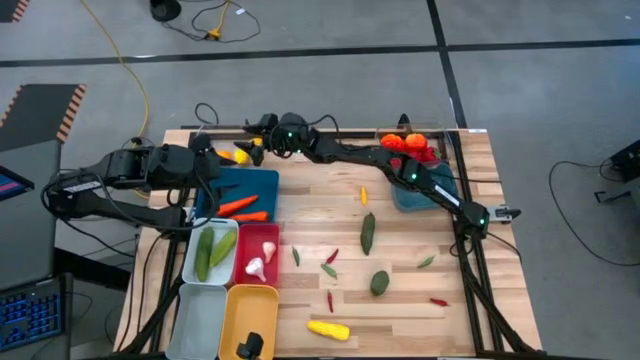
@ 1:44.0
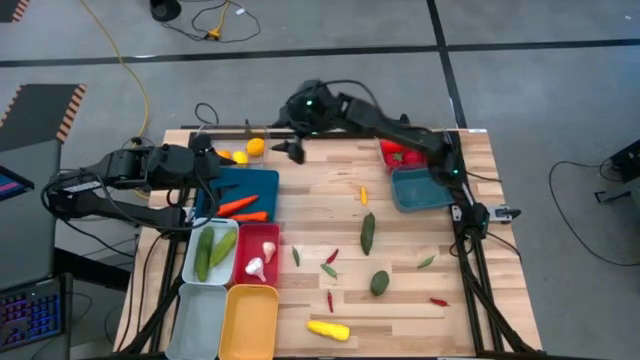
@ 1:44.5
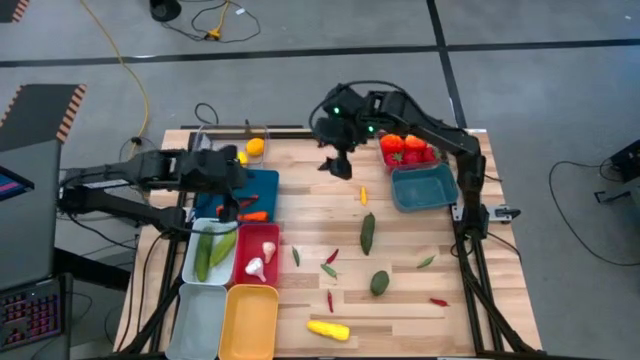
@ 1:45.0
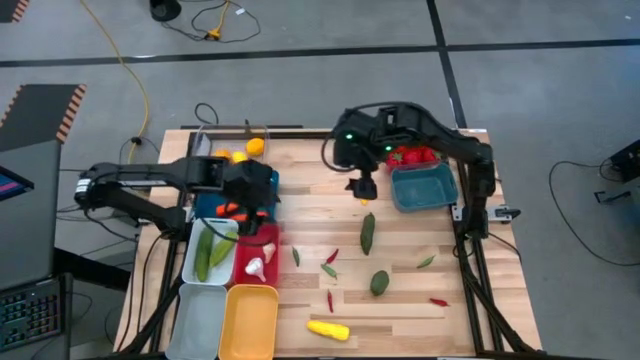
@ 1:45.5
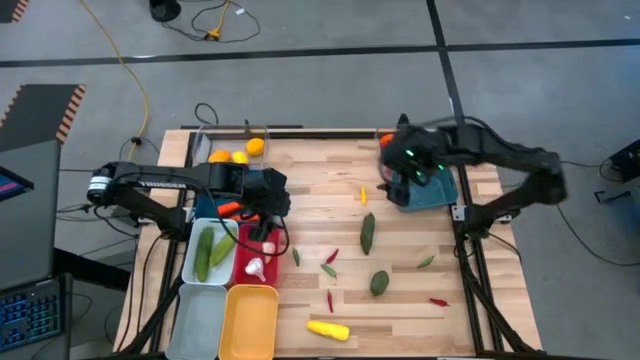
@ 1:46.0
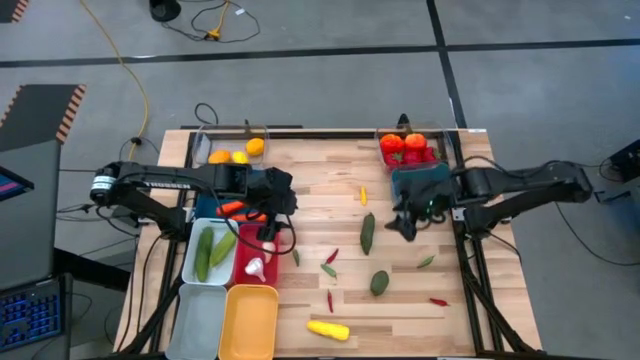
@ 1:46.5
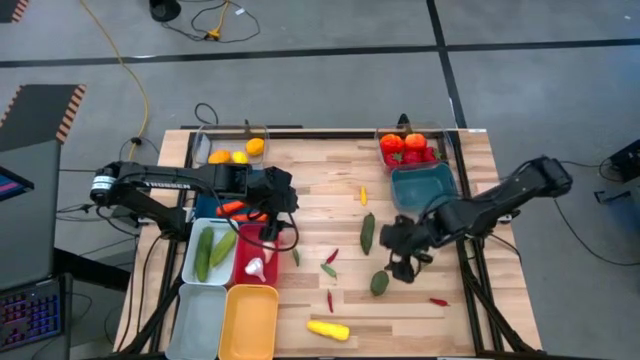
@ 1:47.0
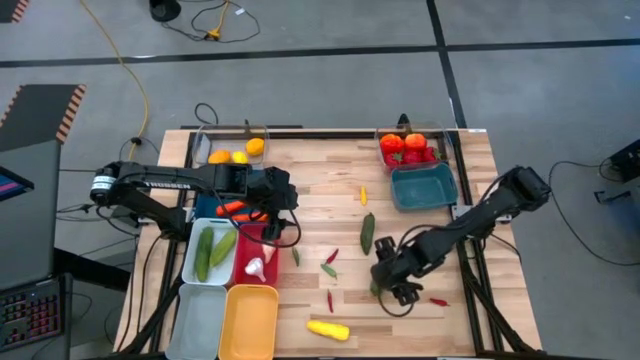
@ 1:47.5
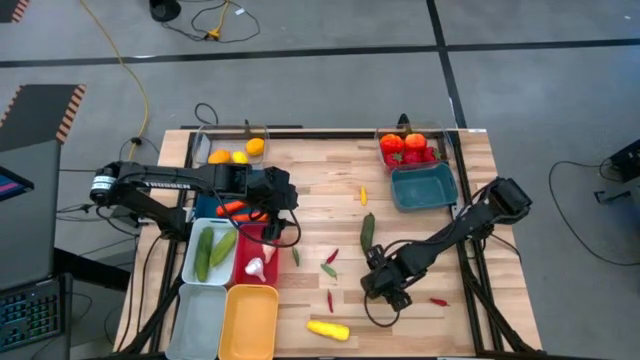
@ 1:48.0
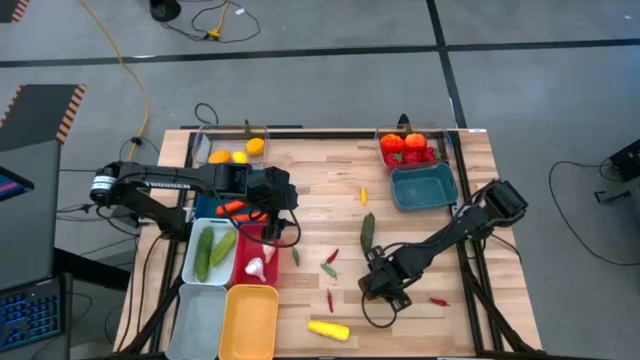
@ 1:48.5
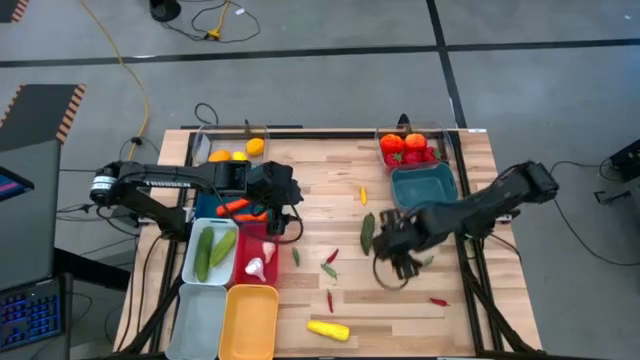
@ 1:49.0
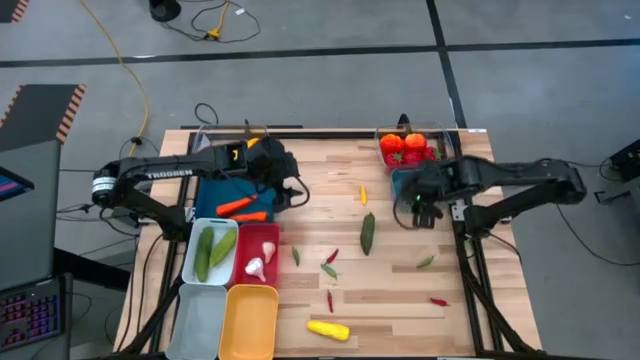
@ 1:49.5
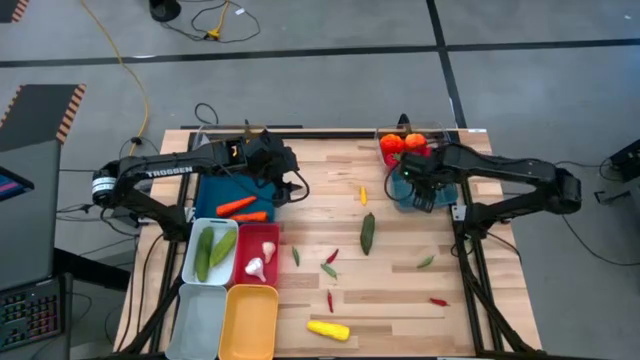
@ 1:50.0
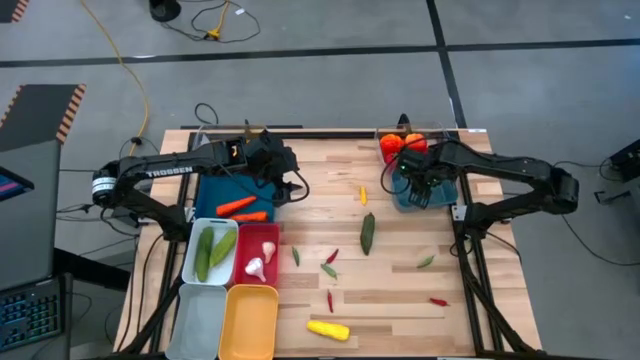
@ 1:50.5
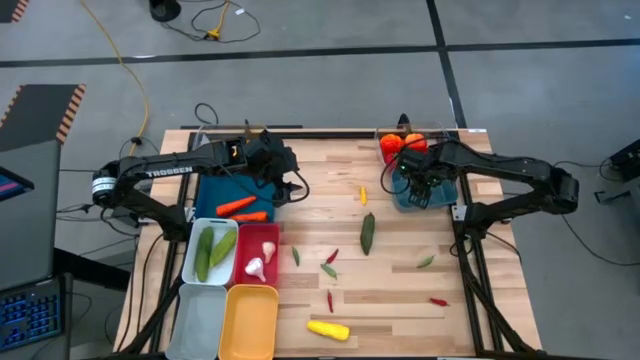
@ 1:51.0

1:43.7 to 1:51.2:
Task: Sort produce into baskets
Put the green lime into the green bin

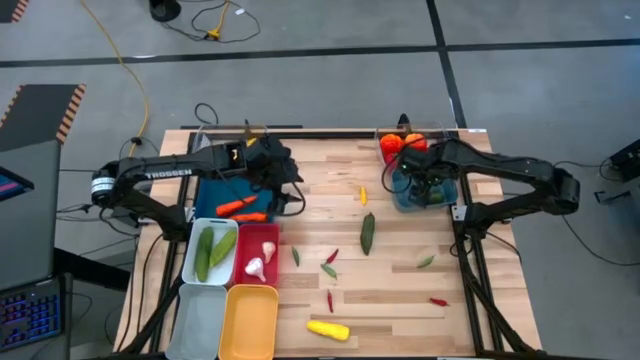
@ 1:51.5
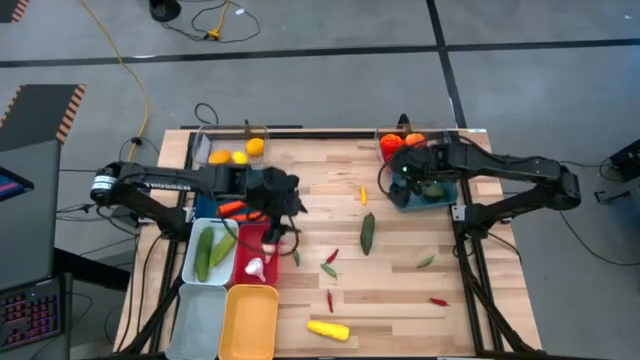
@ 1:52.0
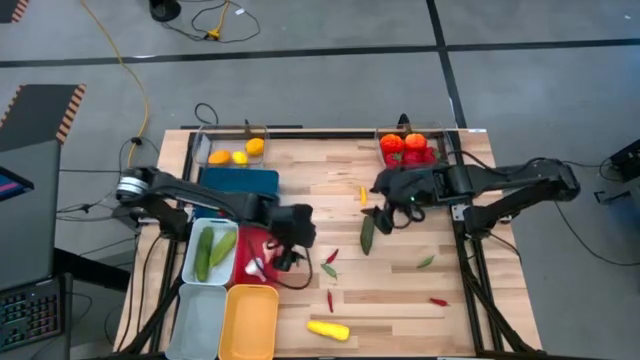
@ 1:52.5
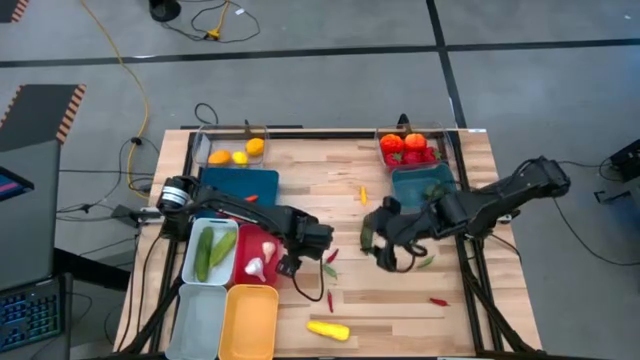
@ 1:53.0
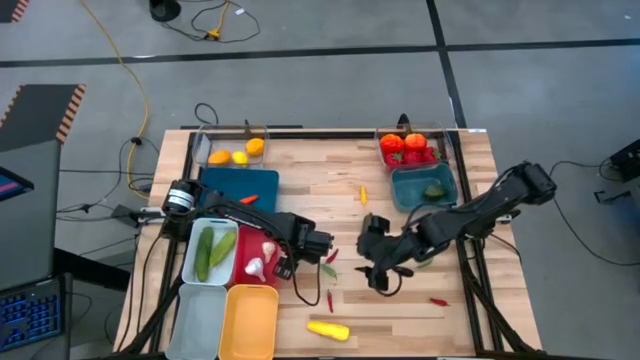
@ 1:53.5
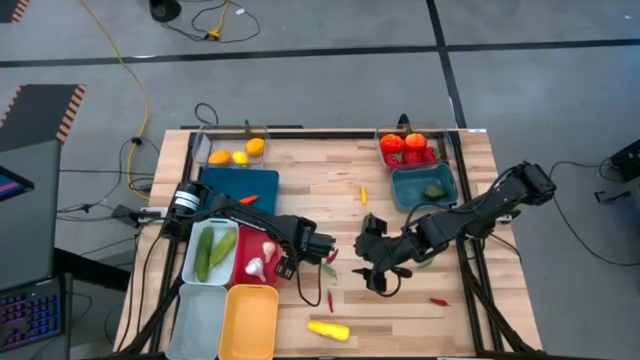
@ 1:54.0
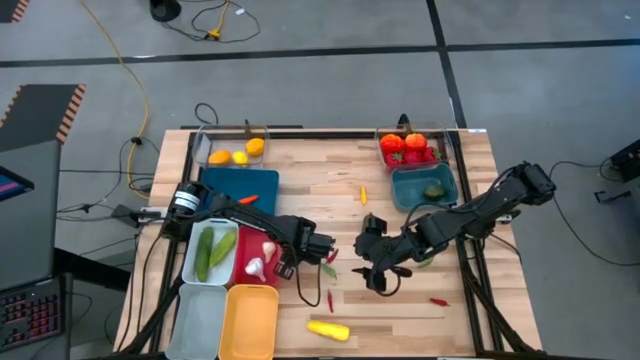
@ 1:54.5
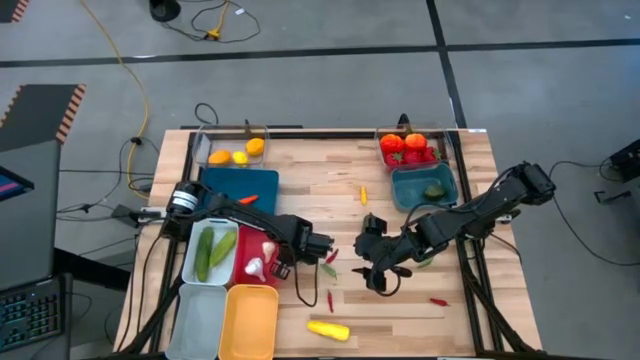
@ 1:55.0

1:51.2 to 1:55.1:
Put the middle left green chili pepper into the yellow bin

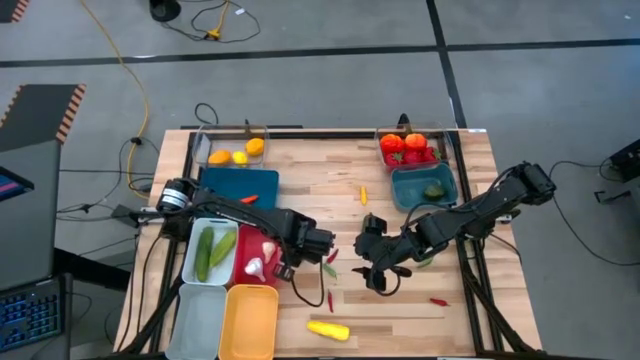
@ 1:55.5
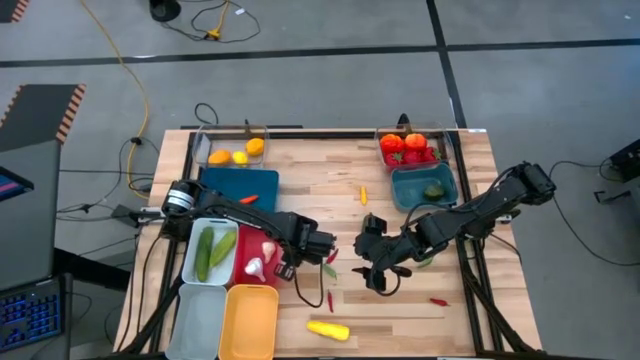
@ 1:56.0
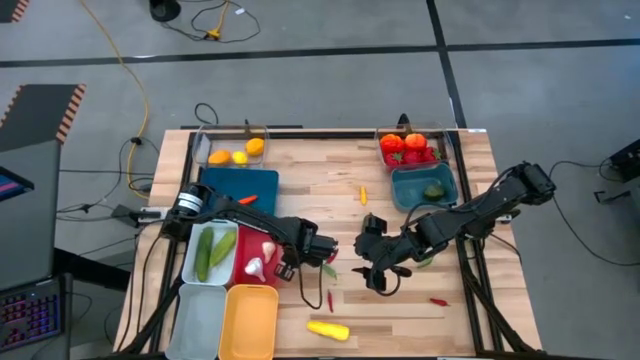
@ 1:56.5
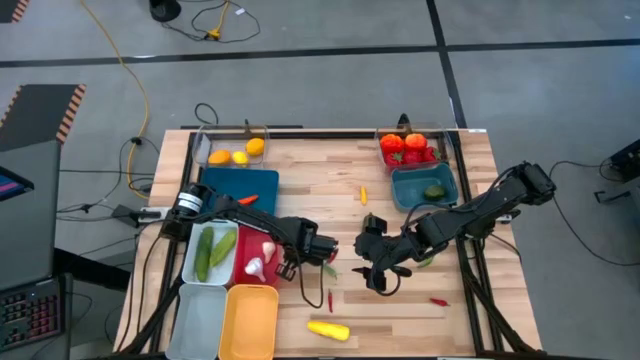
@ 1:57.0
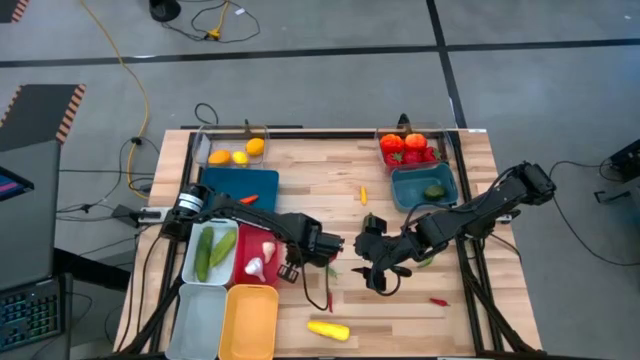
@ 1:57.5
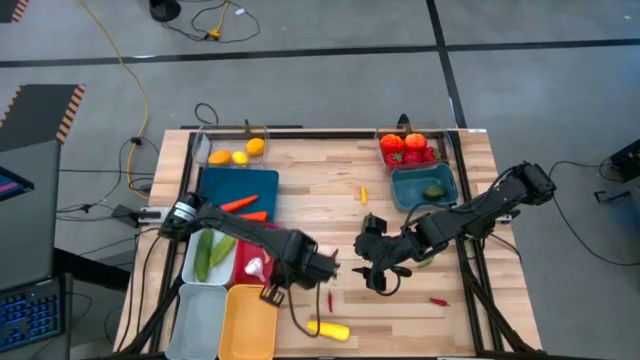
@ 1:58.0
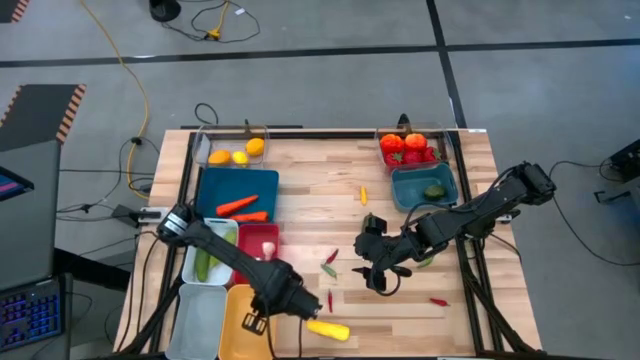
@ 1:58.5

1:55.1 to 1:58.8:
Put the middle left green chili pepper into the yellow bin

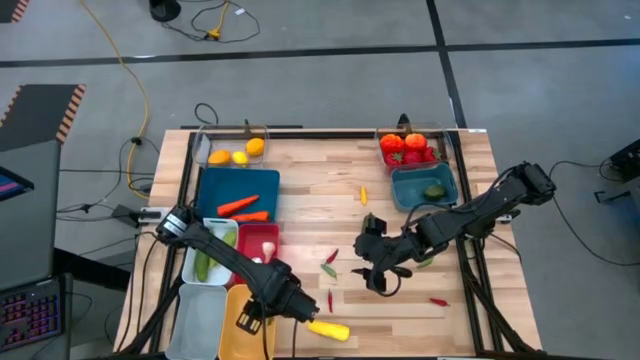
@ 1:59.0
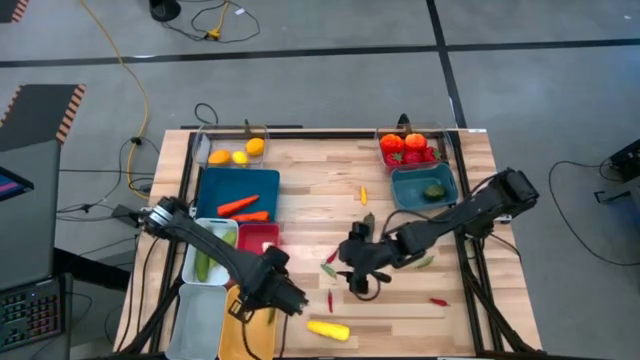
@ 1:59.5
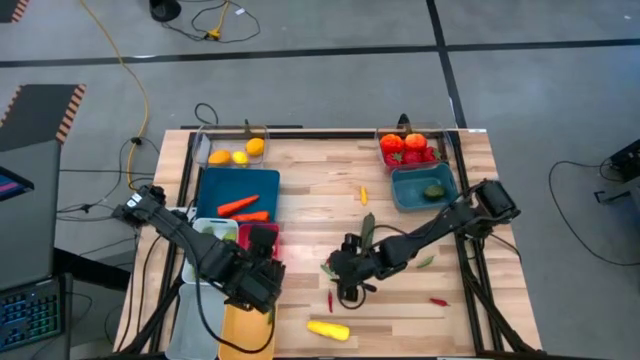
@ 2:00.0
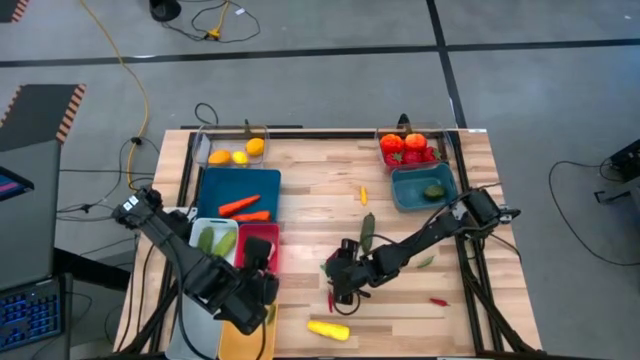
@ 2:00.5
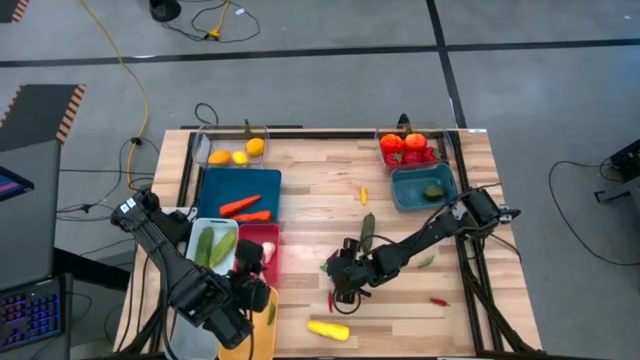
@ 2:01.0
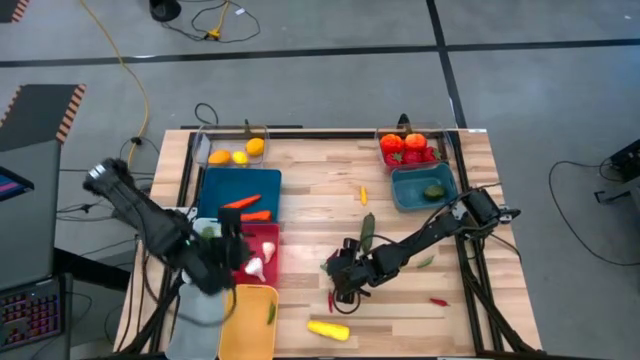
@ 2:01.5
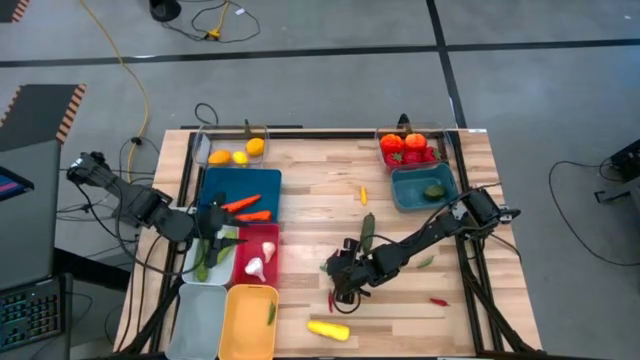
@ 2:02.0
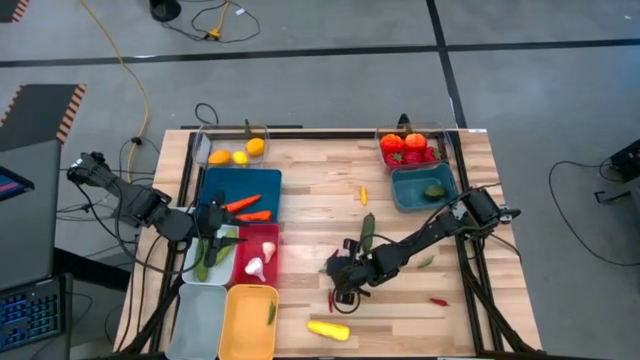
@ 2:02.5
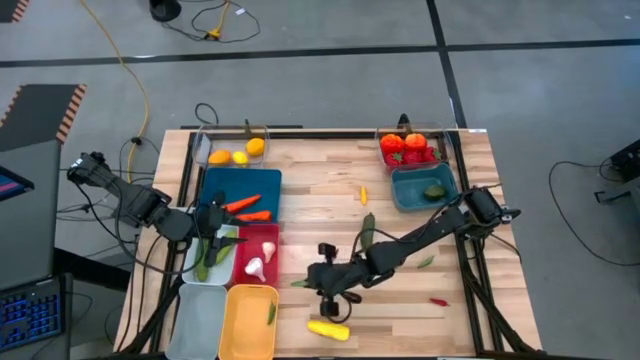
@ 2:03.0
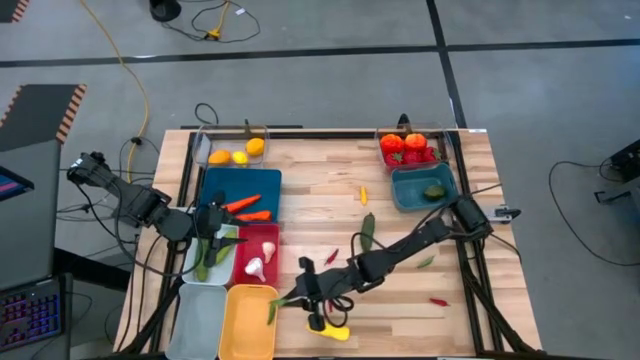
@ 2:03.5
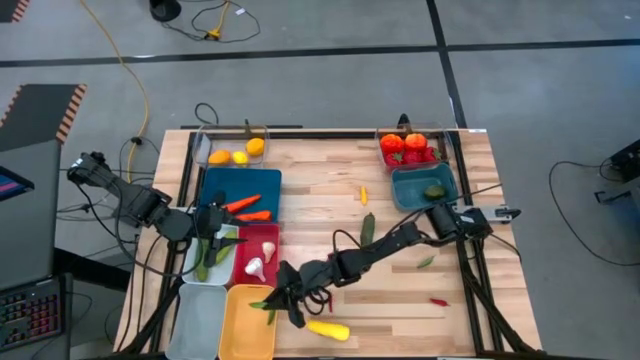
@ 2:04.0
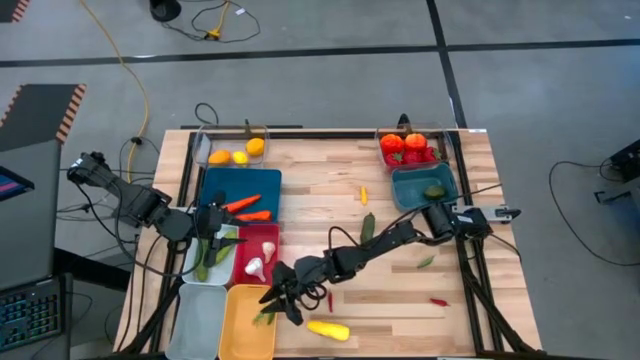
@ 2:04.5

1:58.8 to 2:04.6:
Put the left green chili pepper into the yellow bin
